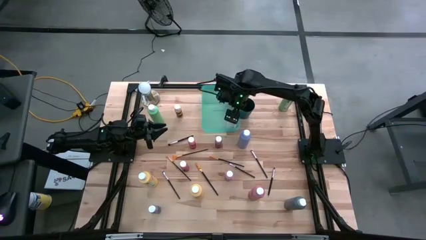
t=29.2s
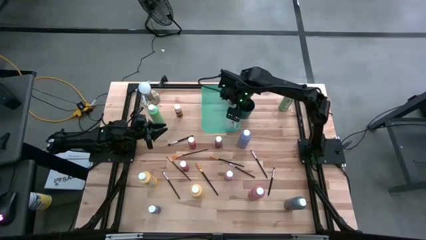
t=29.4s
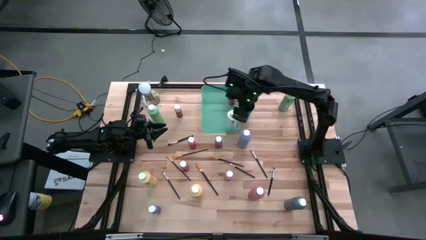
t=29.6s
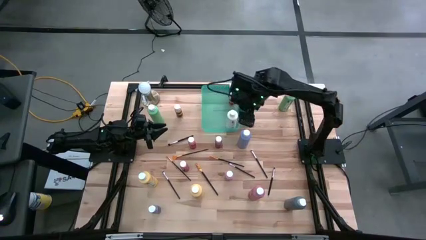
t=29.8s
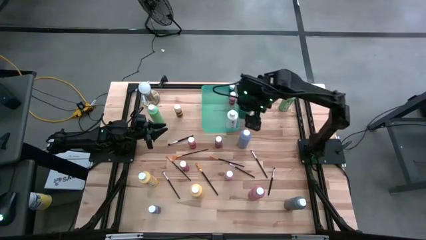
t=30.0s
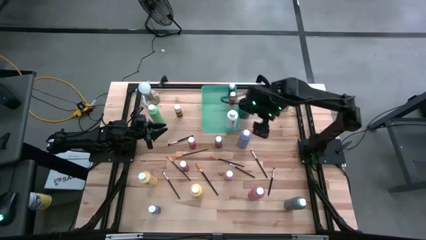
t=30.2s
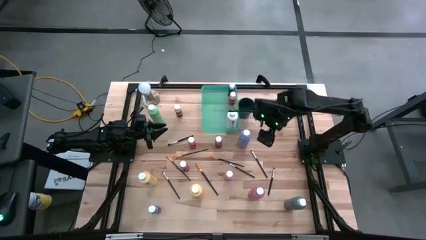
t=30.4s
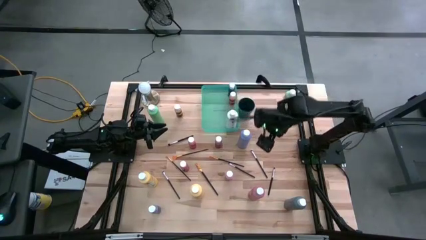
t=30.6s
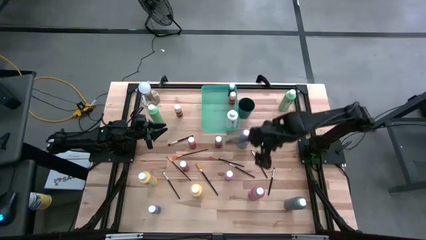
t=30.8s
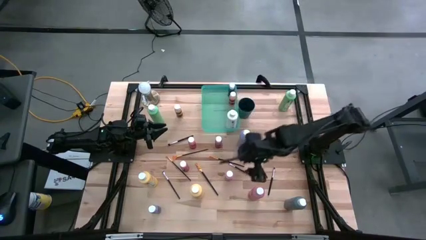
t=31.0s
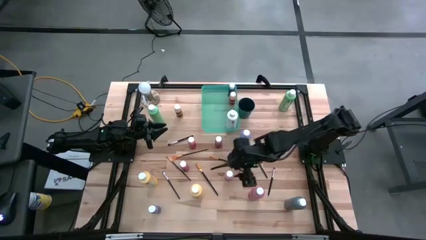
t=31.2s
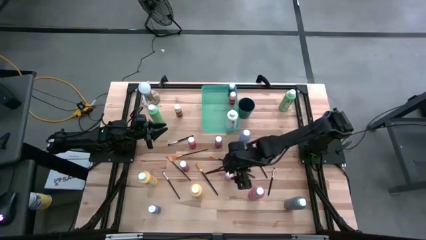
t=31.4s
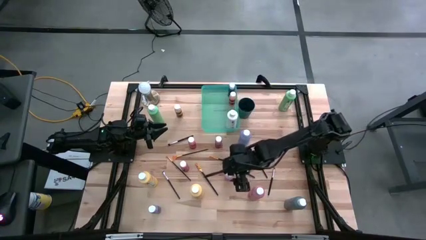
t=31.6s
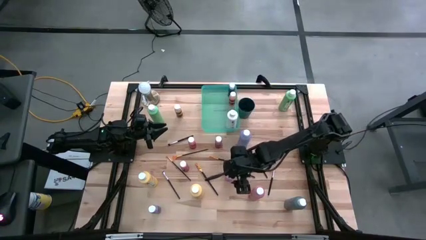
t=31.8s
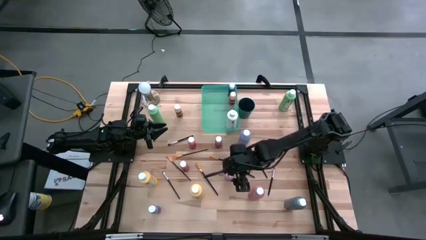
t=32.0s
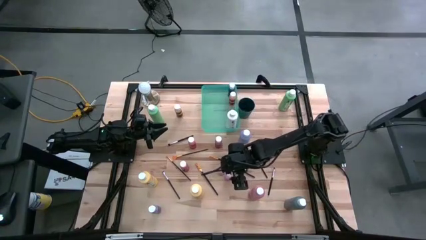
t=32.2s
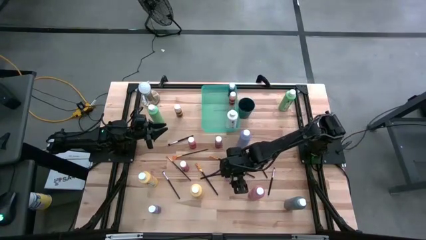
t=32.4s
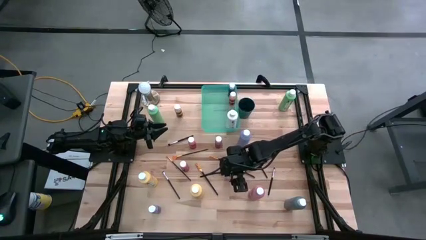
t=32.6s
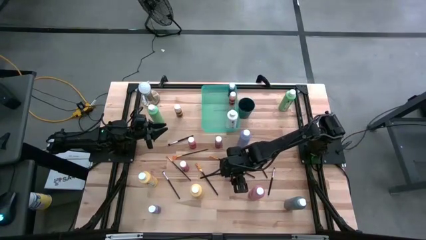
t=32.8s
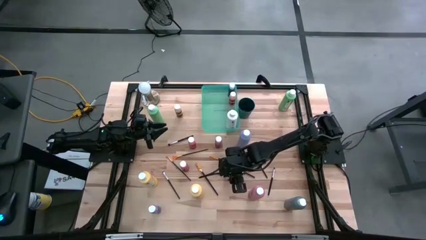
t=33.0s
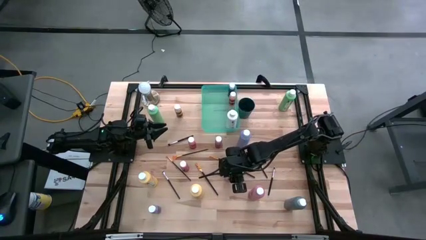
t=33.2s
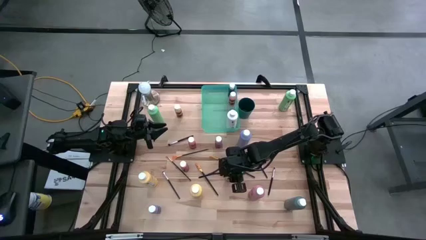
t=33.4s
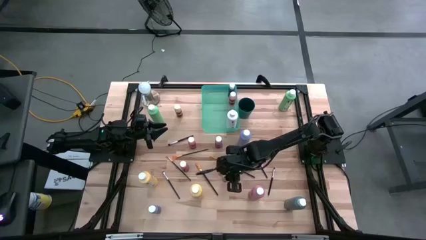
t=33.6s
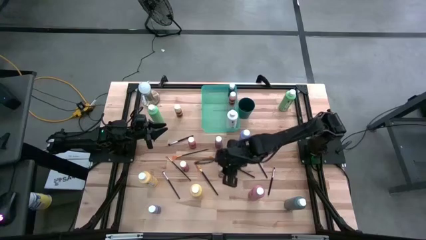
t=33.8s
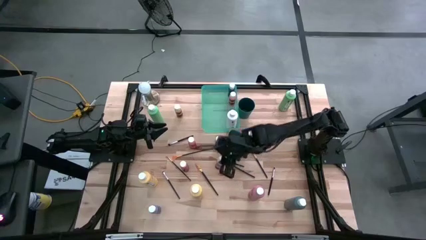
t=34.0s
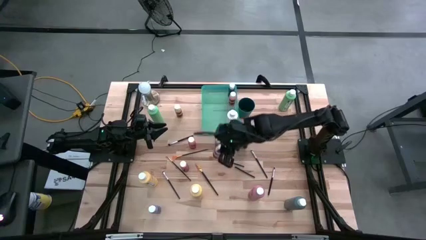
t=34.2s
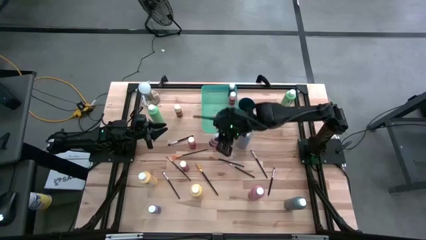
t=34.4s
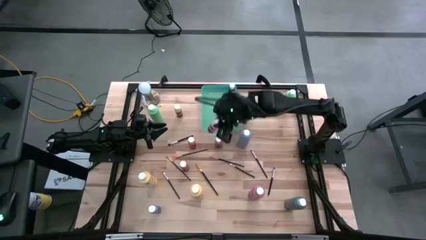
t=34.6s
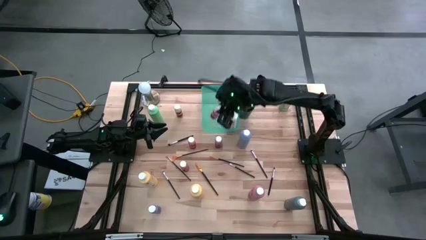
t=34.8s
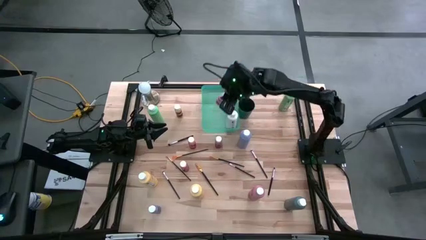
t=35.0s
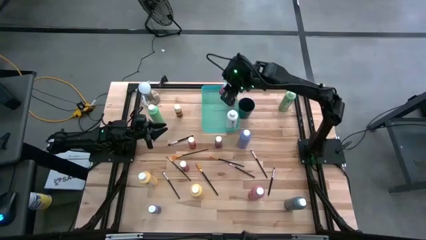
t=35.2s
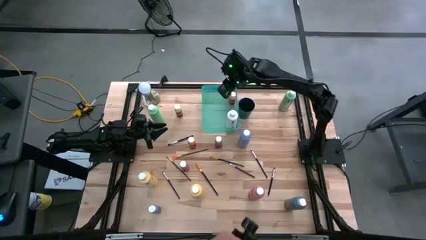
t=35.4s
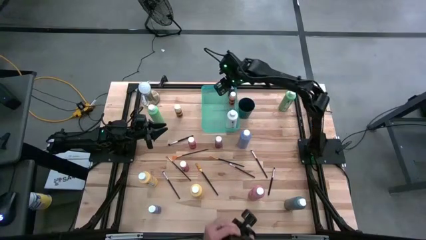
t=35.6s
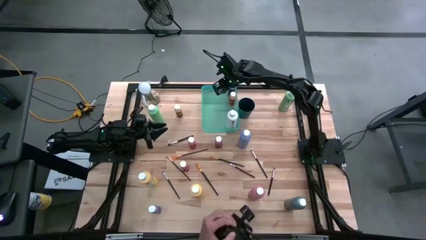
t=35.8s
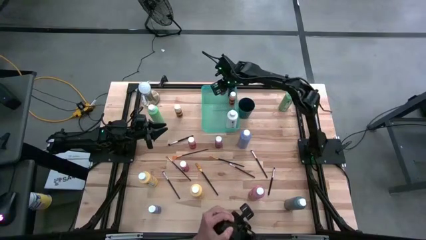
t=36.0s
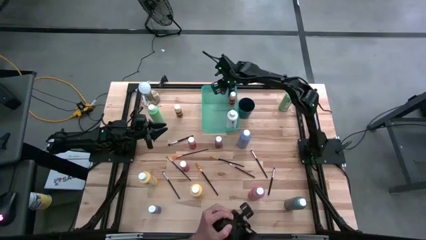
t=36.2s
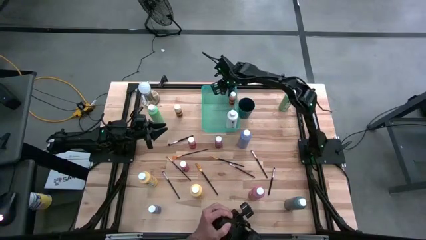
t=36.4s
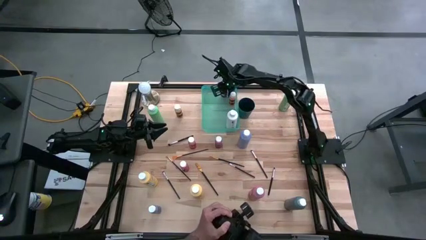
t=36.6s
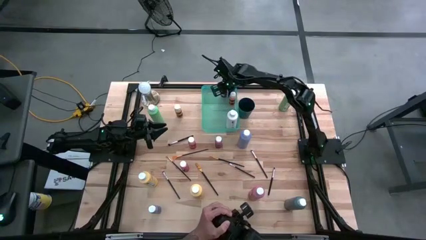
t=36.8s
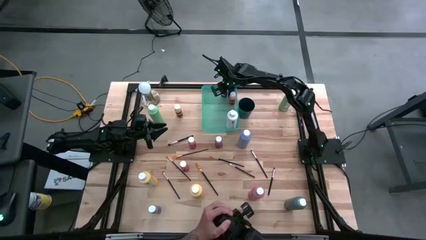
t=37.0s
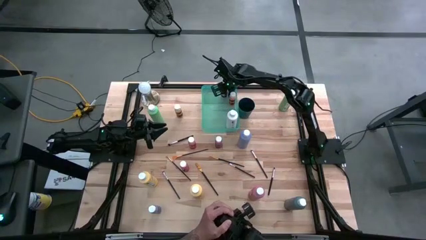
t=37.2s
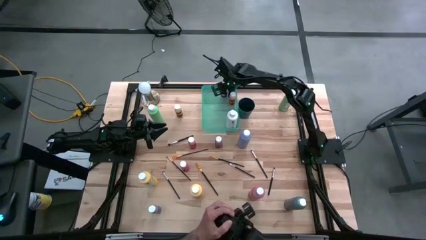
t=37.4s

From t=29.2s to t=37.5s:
Task: Pick & Place Paint Supplies
Put the light pink paint bottle into the green bin

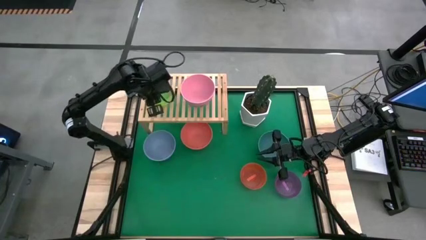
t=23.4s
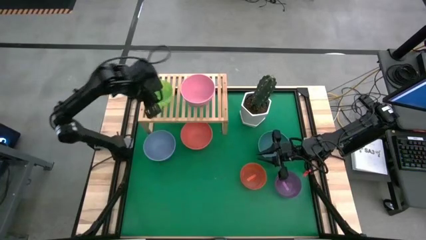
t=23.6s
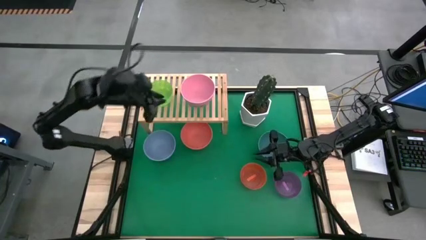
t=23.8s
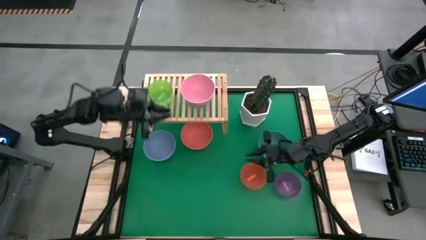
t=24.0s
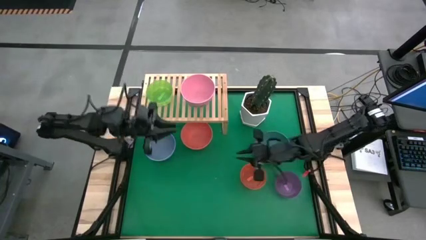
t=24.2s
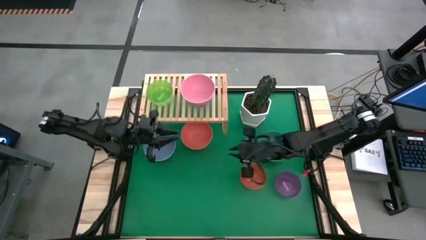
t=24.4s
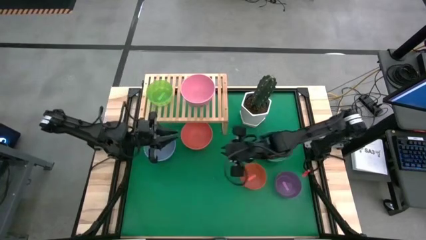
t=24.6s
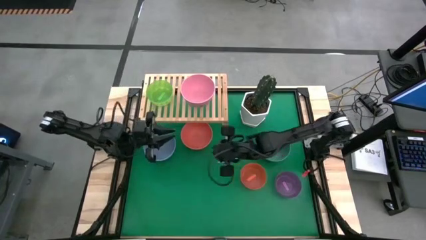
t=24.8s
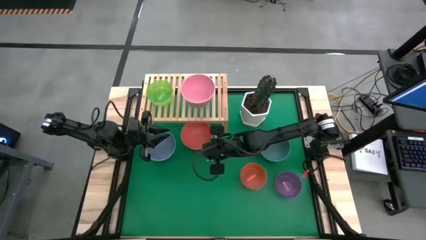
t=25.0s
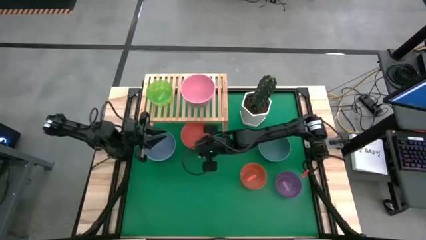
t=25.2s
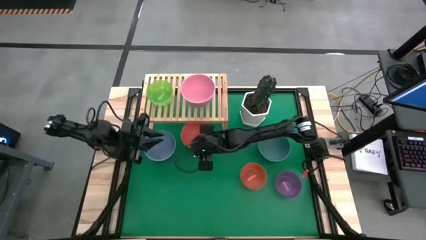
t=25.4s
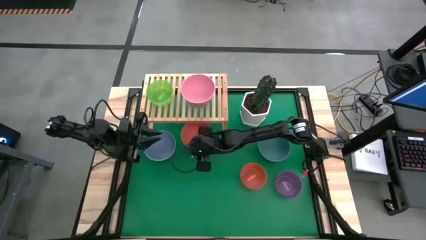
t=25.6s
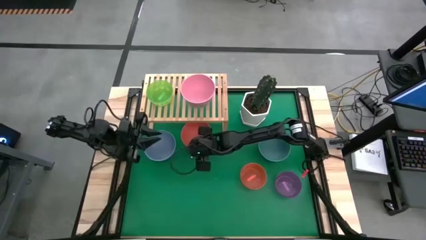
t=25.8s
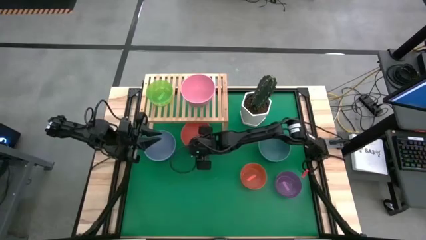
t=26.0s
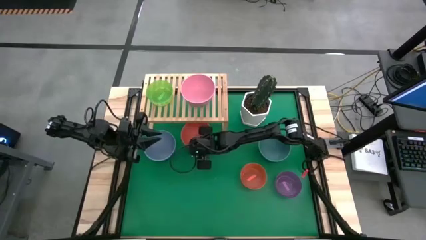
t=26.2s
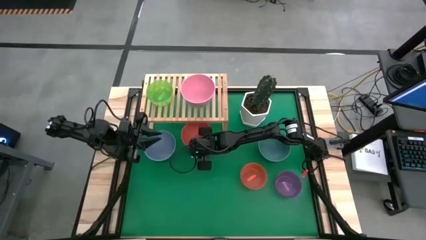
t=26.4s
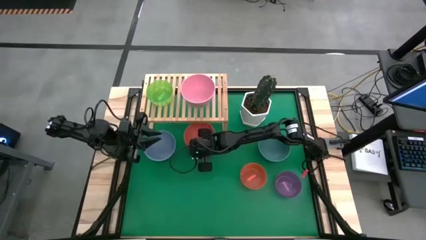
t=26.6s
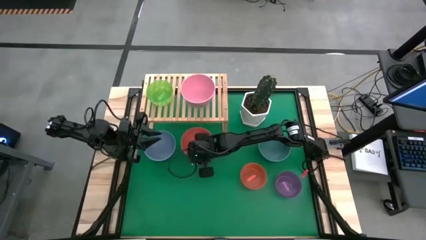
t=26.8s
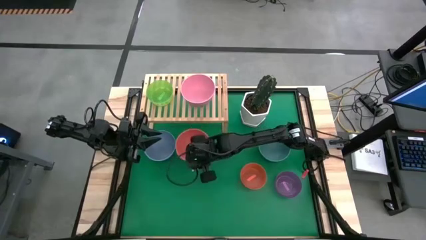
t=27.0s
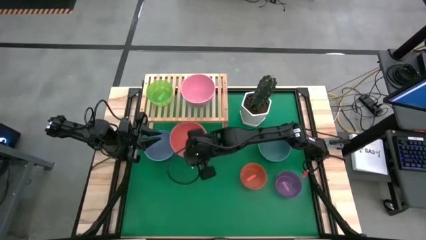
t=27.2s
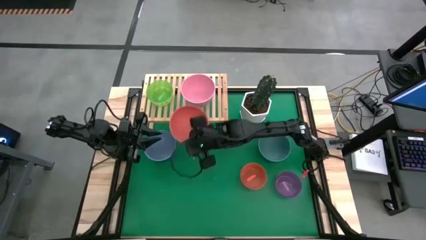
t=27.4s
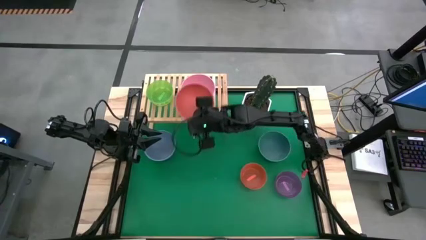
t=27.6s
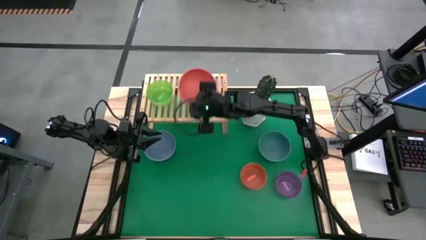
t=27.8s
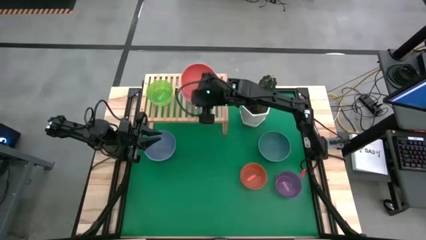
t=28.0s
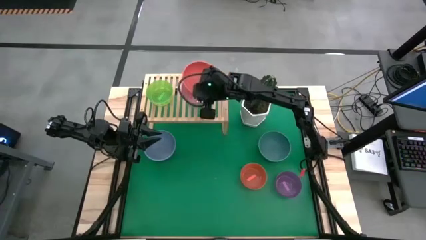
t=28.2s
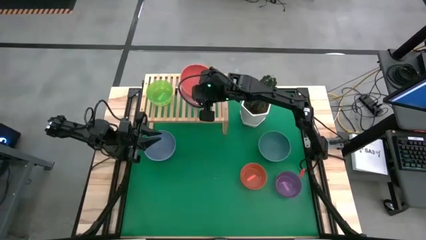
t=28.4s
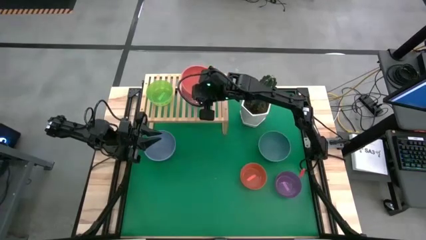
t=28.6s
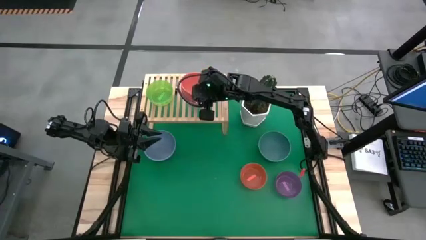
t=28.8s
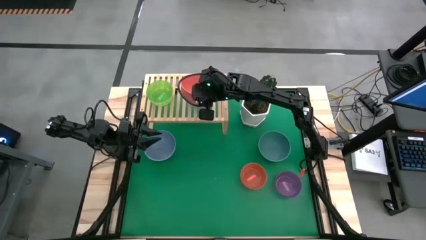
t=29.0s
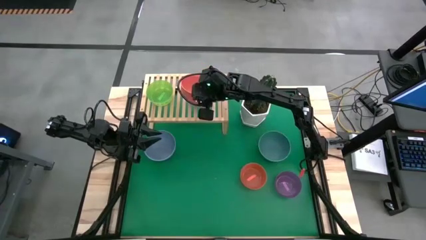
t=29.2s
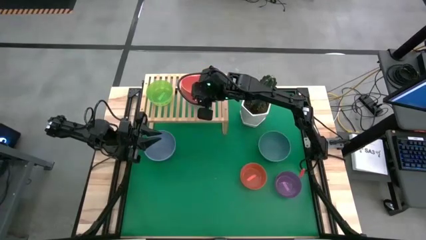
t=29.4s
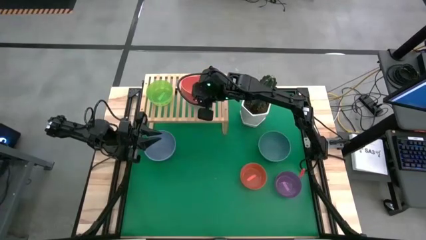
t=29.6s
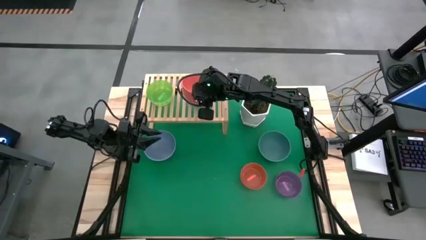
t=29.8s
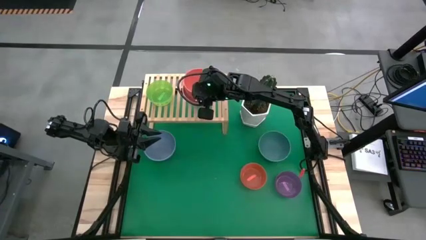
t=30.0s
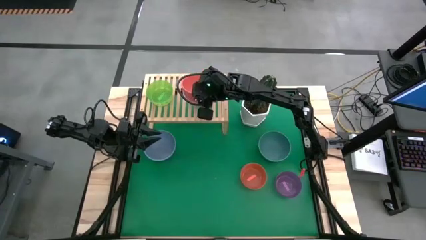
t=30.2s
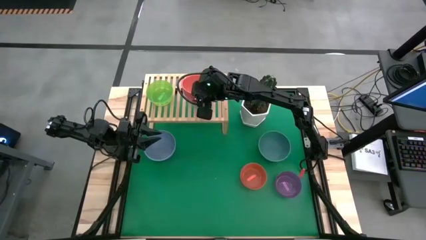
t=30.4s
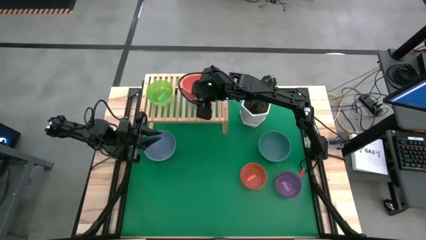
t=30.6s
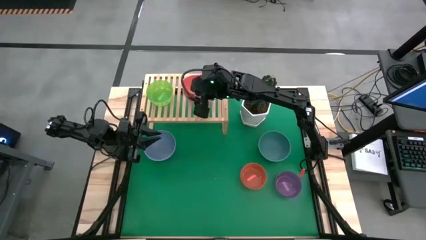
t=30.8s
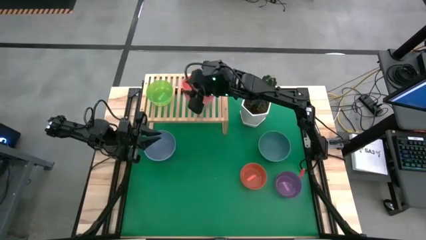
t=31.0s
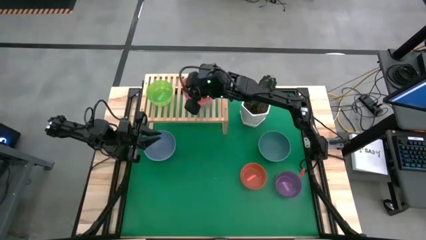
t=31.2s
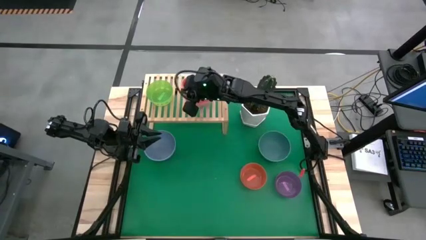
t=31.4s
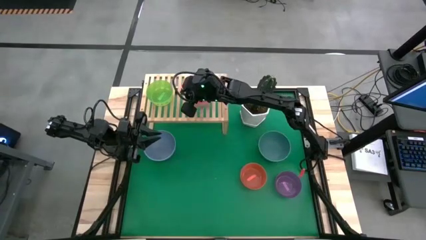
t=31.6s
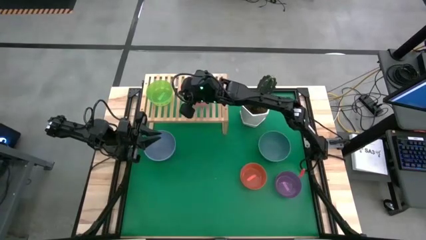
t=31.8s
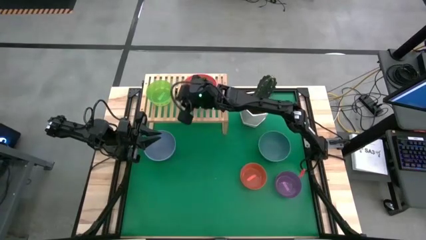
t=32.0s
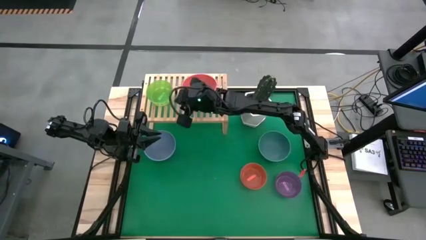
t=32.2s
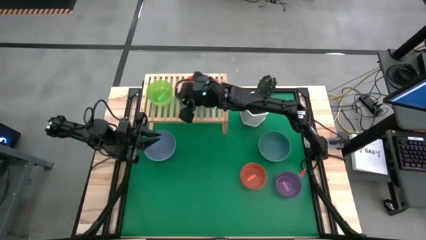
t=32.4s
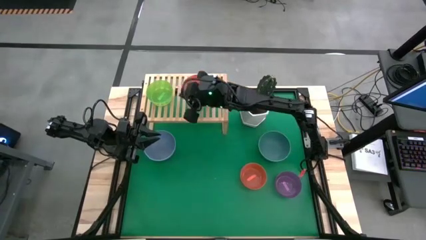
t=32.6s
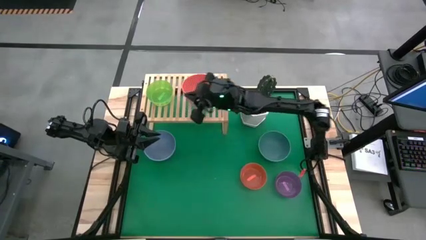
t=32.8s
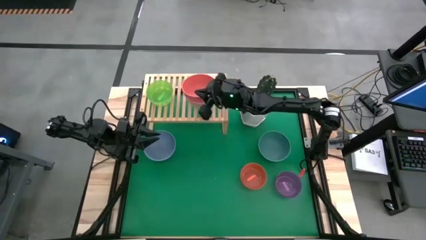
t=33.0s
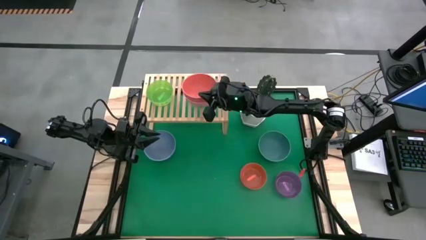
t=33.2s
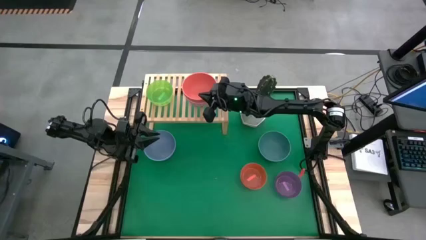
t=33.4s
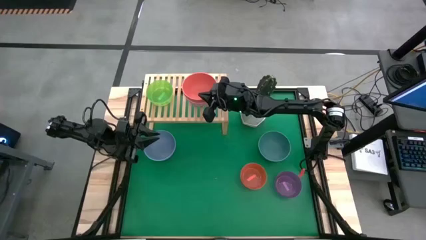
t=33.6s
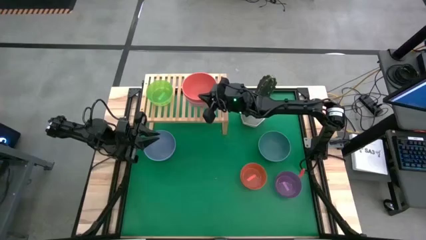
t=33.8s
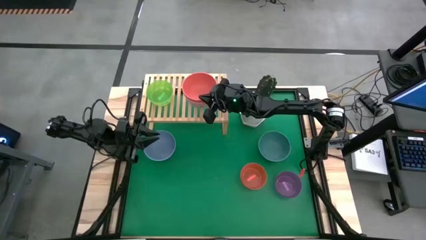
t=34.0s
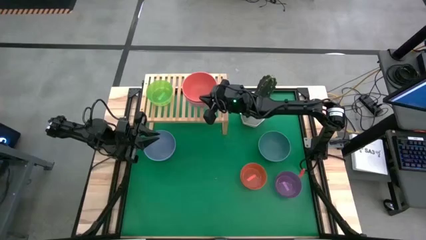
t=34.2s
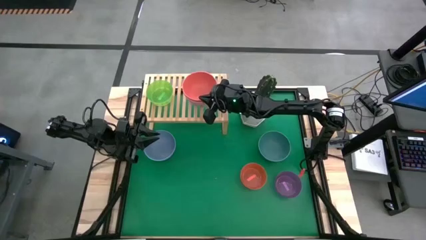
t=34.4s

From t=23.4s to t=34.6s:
Task: Place and stack bowls onto a shelf
Stack the orange bowl on top of the pink bowl on the shelf
